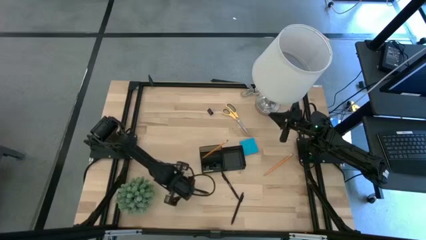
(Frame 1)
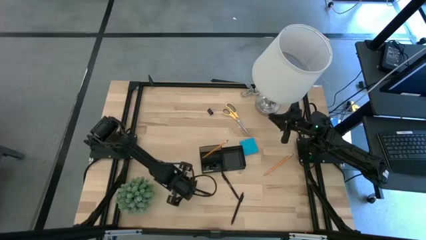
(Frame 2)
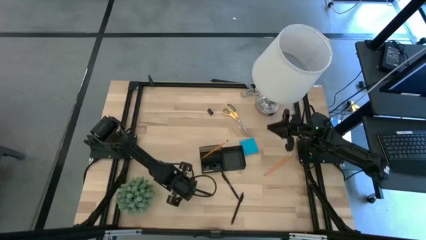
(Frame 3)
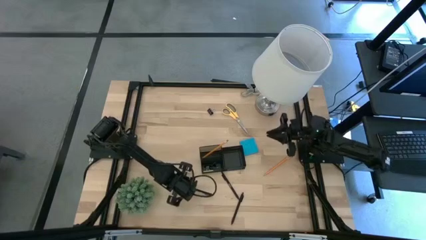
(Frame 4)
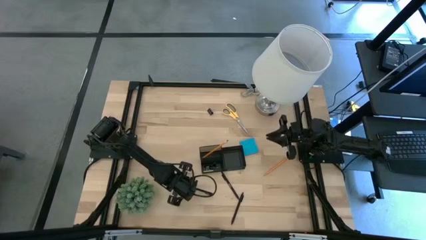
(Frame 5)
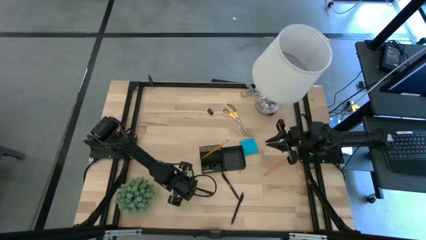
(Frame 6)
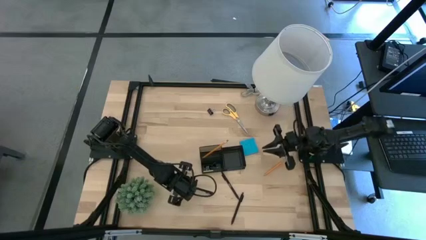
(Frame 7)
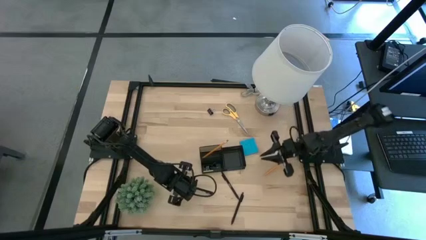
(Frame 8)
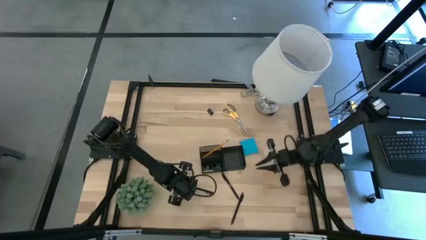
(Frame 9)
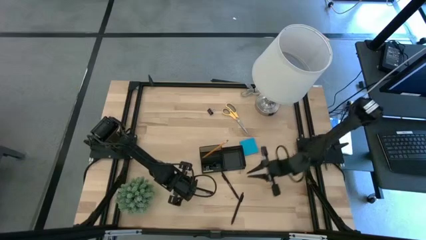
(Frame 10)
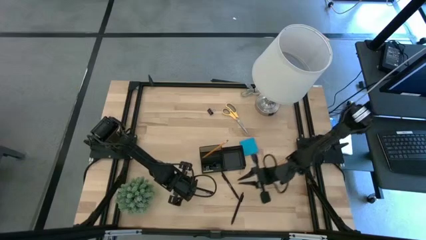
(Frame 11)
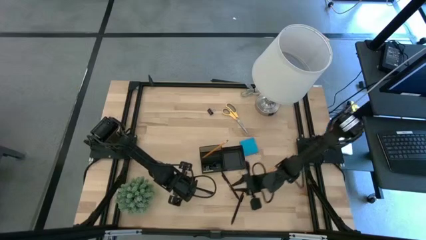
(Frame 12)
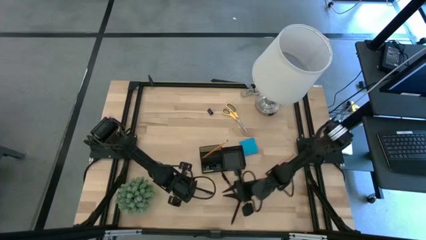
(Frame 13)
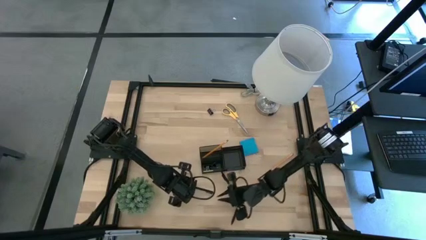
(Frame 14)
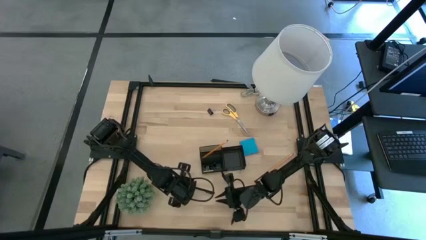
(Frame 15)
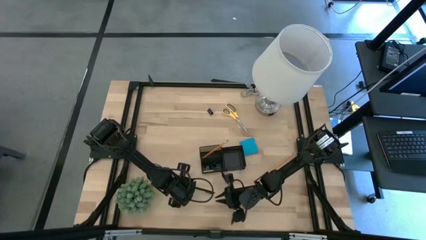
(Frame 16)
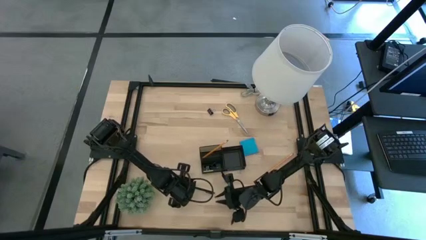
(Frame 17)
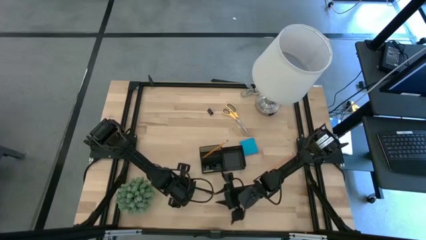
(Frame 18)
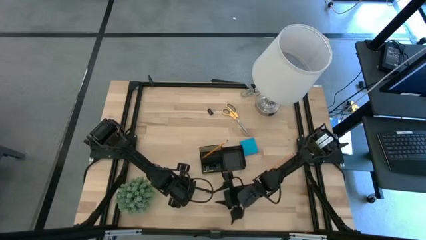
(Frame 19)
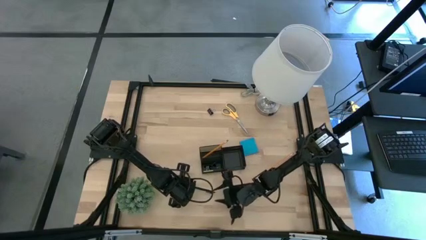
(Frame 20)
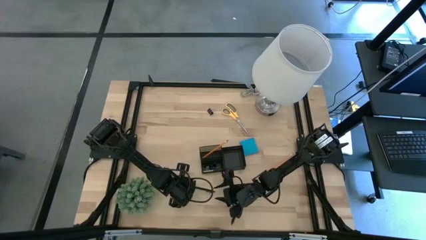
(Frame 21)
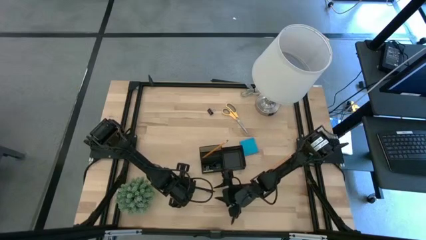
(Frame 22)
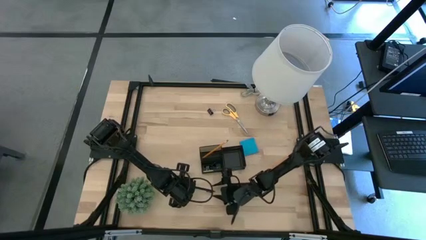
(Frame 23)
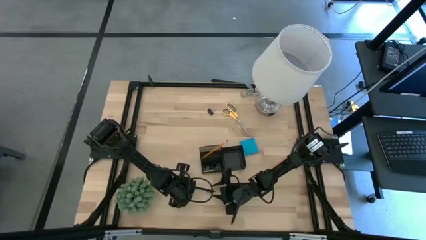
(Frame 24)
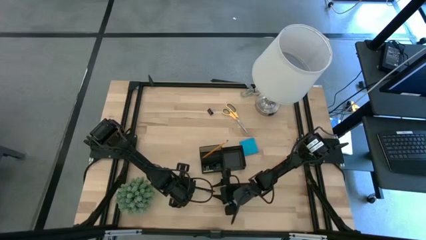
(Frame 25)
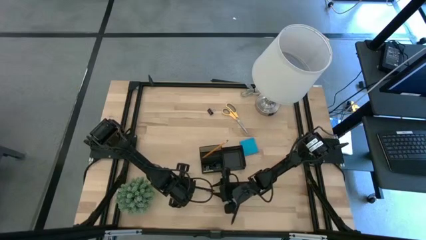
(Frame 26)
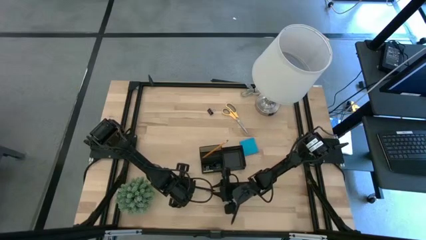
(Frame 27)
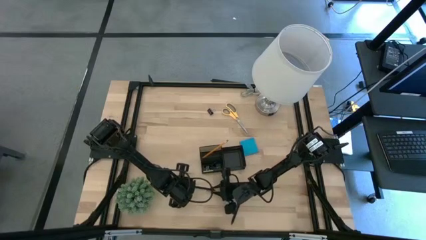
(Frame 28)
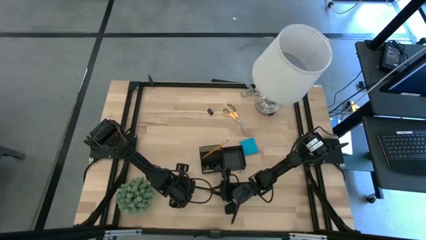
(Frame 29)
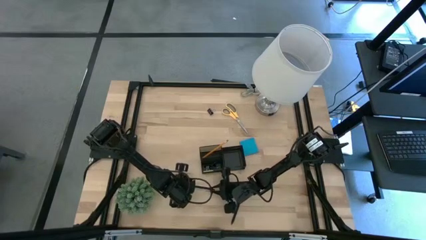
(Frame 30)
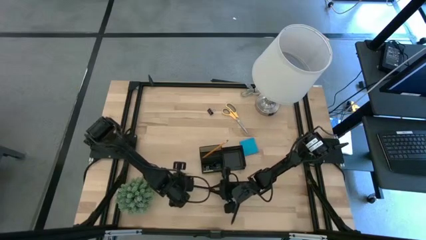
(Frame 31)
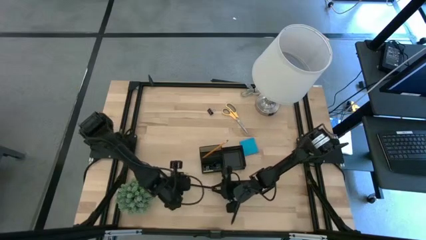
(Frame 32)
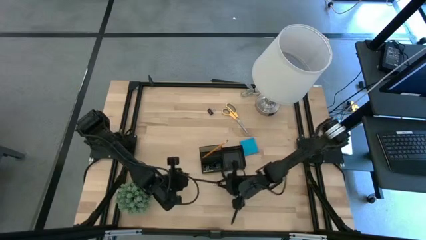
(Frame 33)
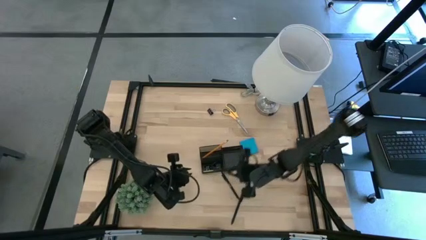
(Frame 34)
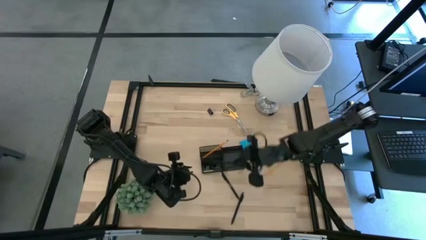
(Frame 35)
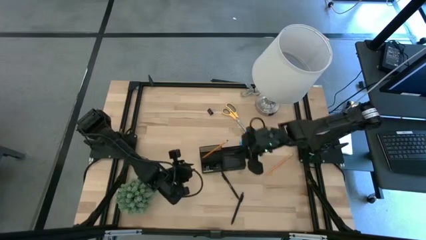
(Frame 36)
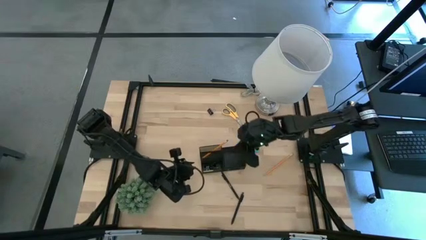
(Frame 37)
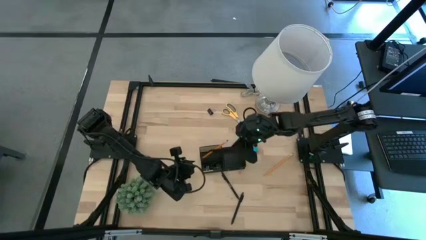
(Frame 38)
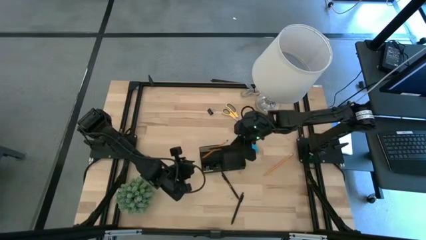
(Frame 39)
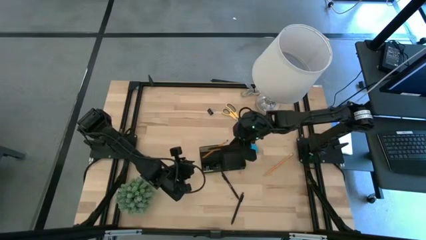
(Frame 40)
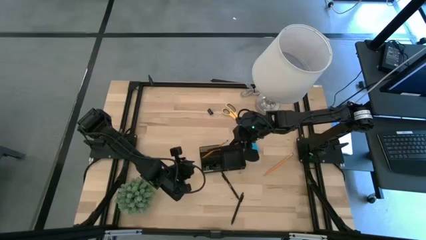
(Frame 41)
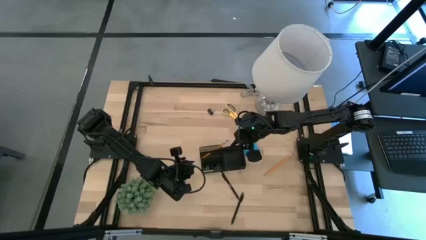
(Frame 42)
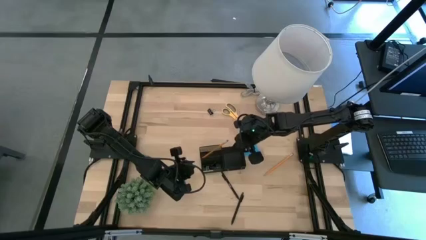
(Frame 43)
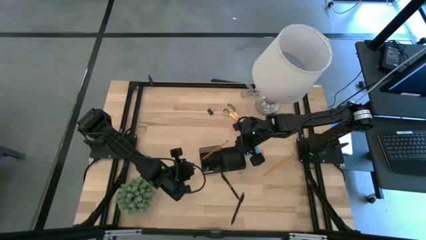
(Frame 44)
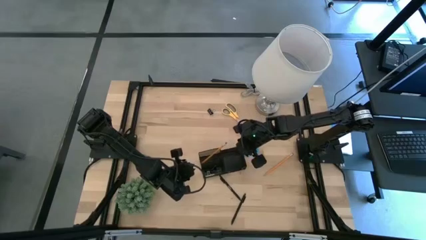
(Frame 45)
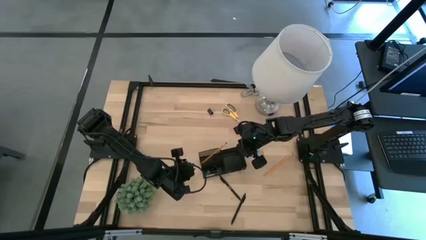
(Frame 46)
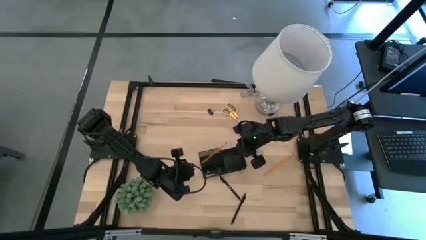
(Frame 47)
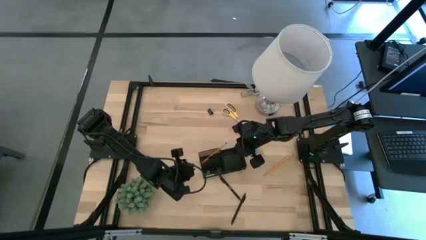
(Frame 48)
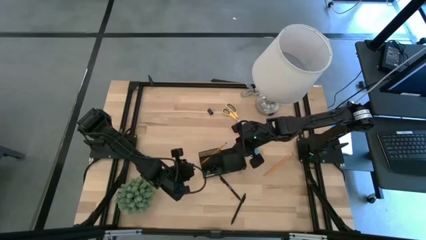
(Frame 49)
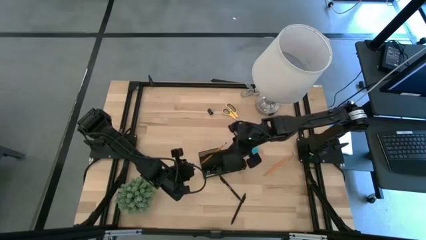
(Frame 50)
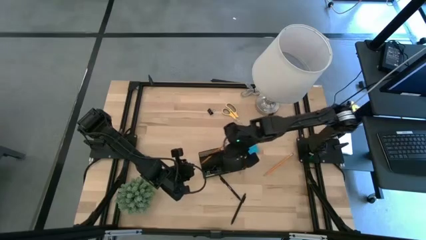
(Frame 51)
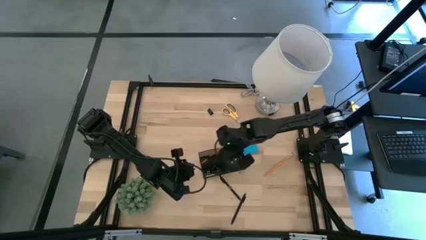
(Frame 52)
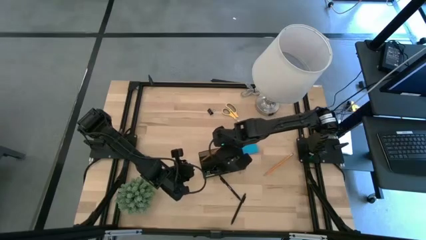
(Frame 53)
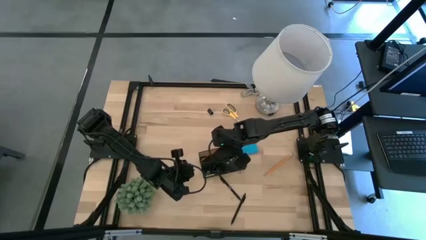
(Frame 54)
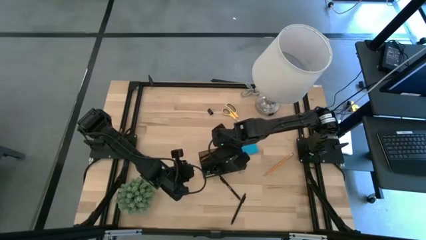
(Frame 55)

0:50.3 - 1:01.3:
Task: Pick and place office supplies into organizer
Put the top black pen into the desk organizer

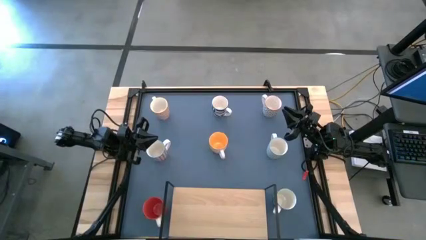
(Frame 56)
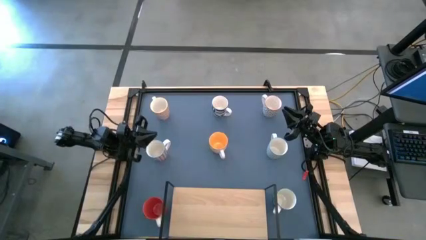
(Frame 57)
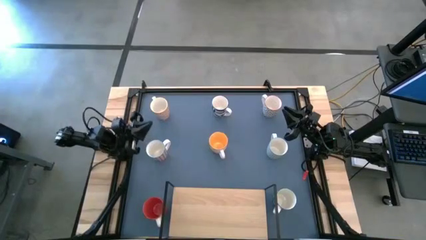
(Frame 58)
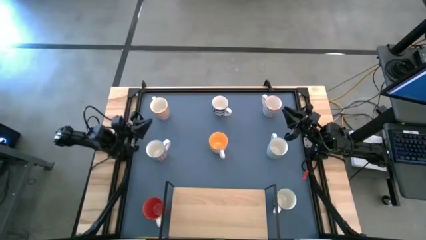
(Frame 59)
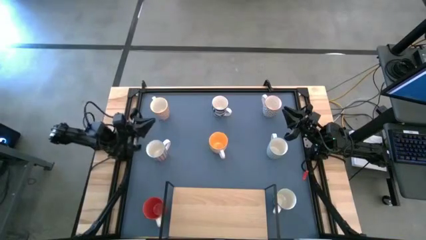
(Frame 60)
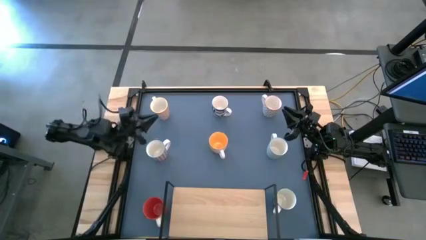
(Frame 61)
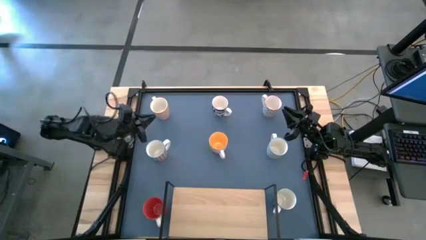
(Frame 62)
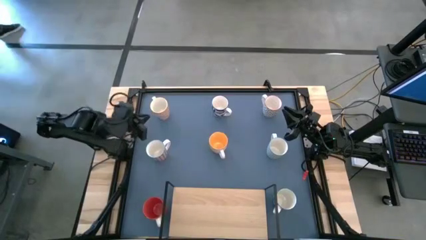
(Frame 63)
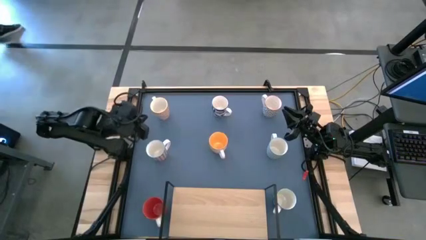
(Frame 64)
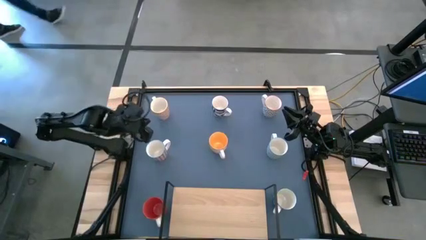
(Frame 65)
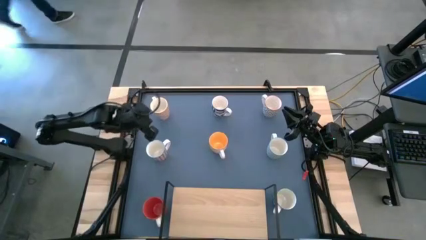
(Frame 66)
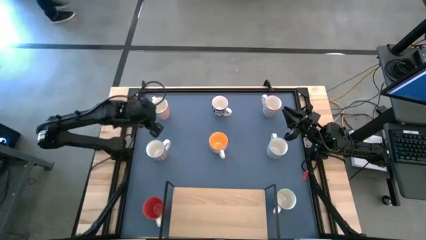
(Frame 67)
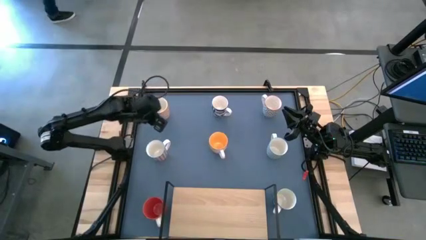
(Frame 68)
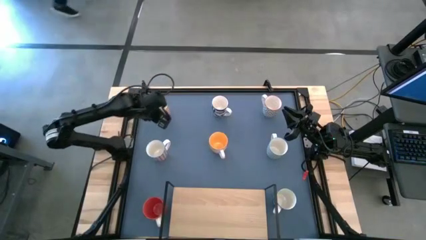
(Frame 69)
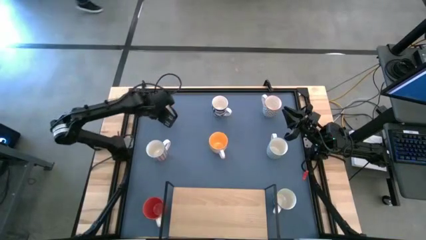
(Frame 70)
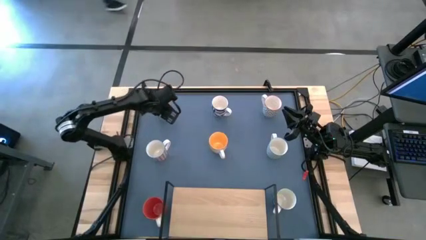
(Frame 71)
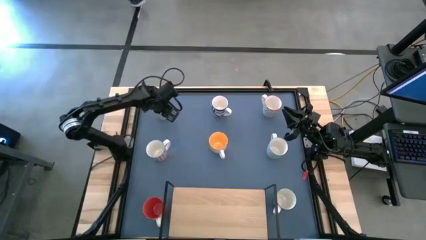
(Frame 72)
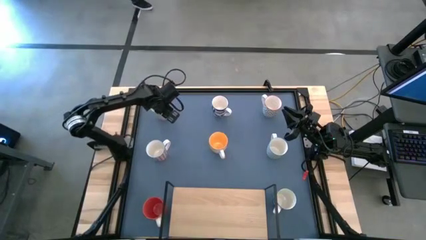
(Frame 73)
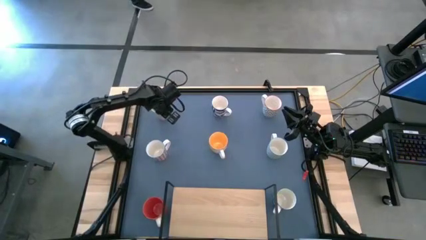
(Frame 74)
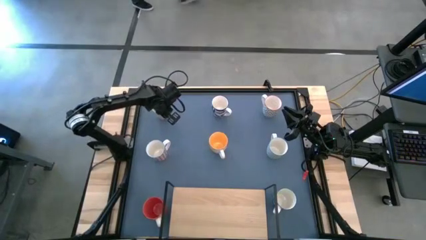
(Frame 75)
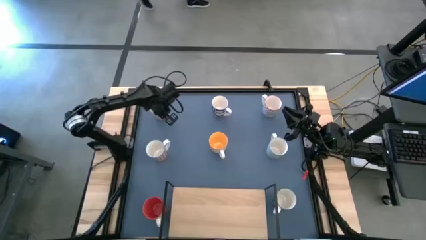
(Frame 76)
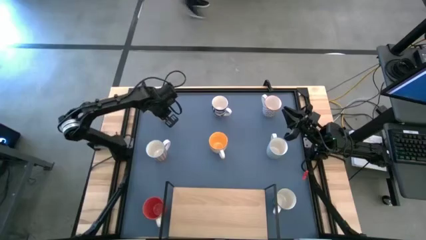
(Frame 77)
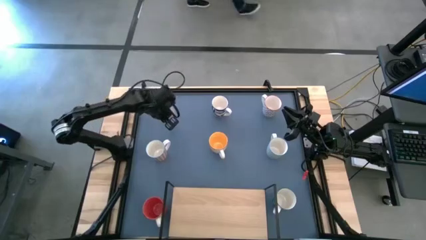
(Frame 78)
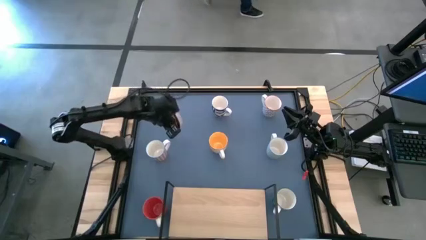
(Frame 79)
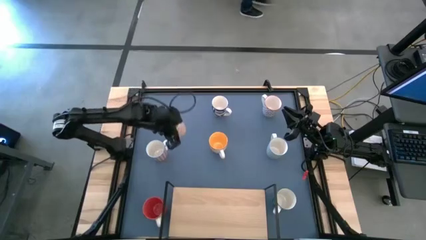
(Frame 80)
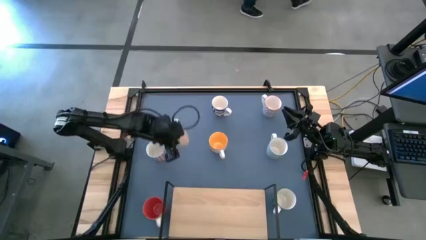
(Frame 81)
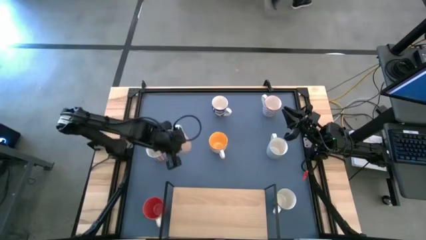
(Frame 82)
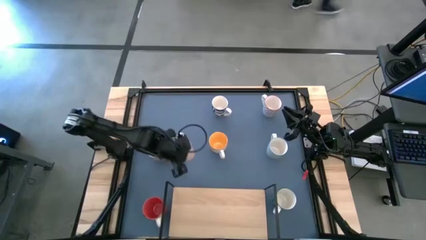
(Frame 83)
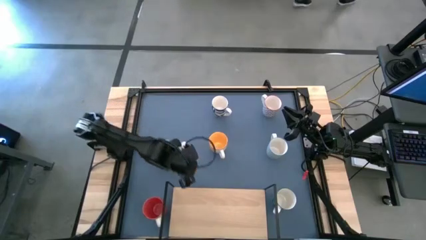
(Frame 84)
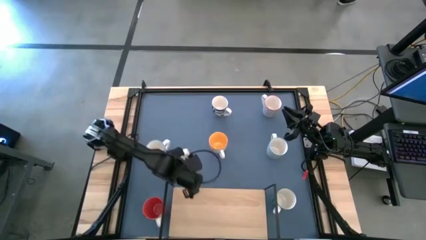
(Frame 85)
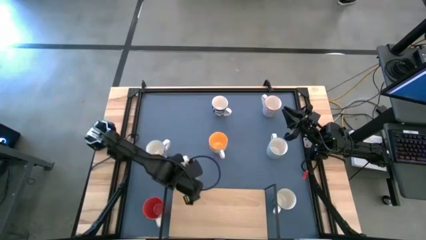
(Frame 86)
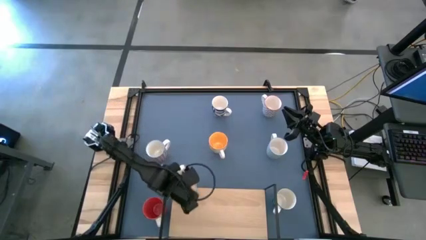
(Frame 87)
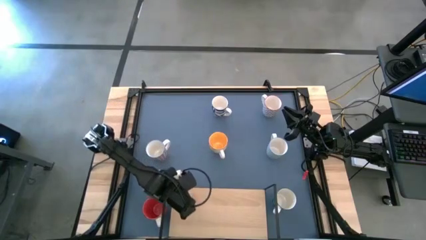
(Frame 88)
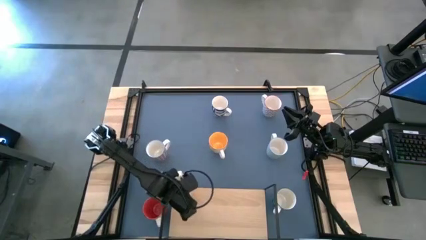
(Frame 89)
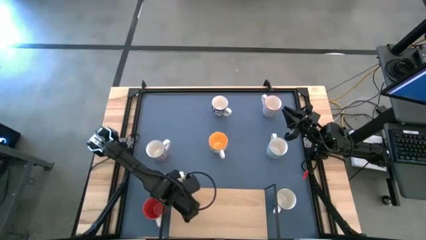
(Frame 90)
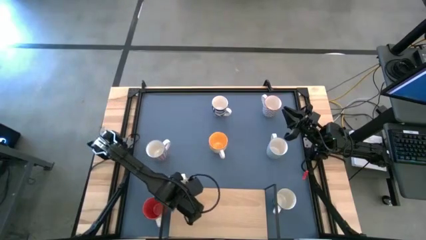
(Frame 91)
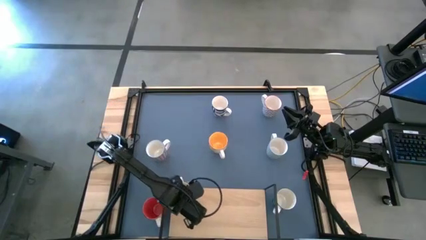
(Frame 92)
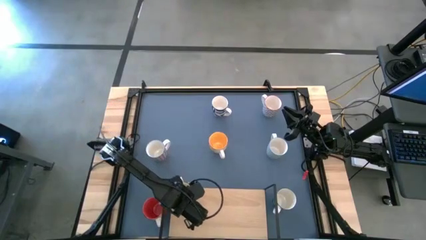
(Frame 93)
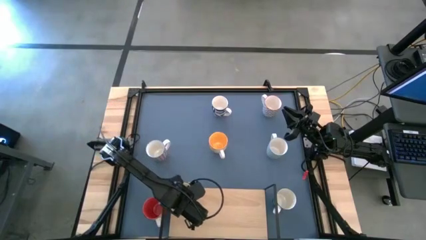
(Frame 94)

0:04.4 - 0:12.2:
Task: Place coffee mugs
Put the light red patterned mug on the shelf
